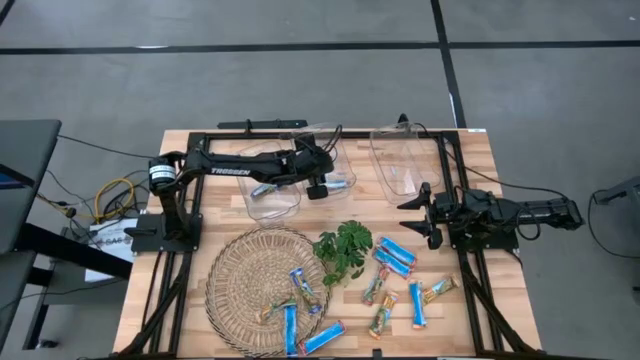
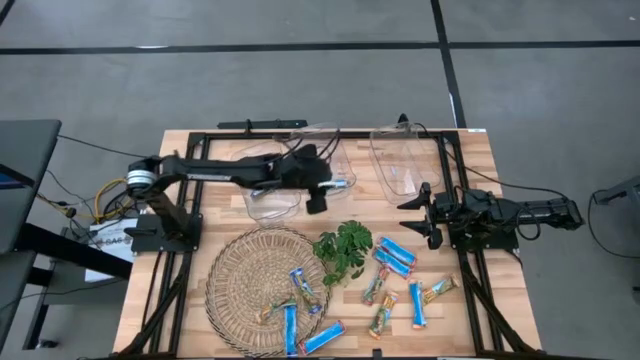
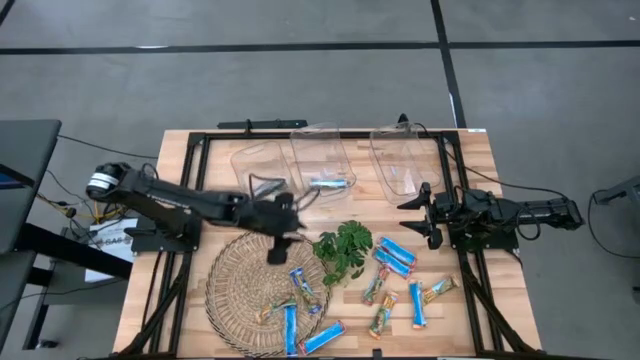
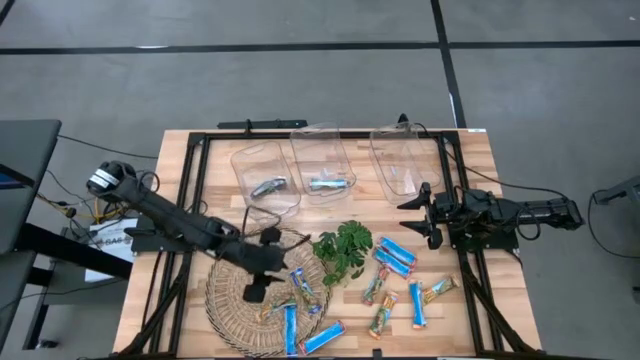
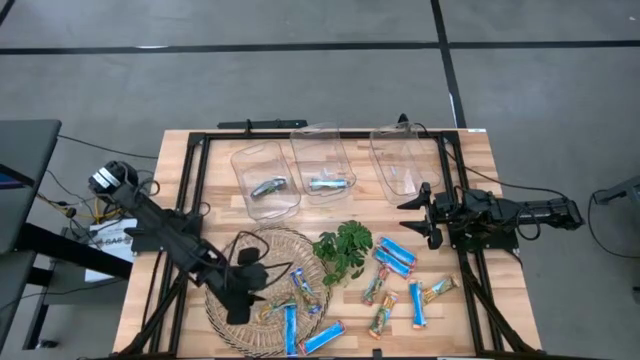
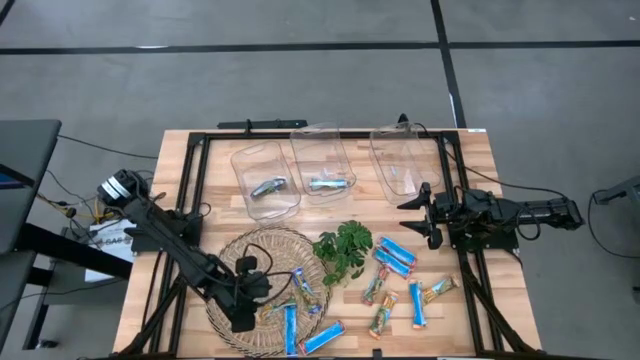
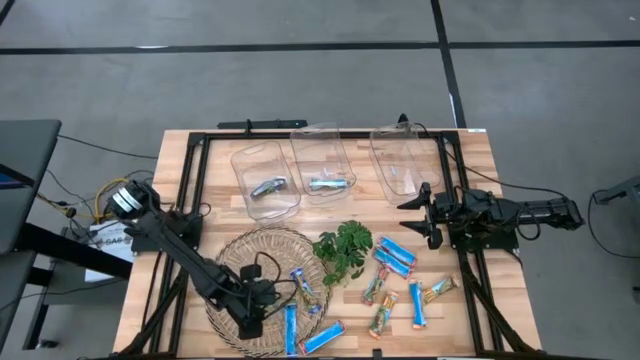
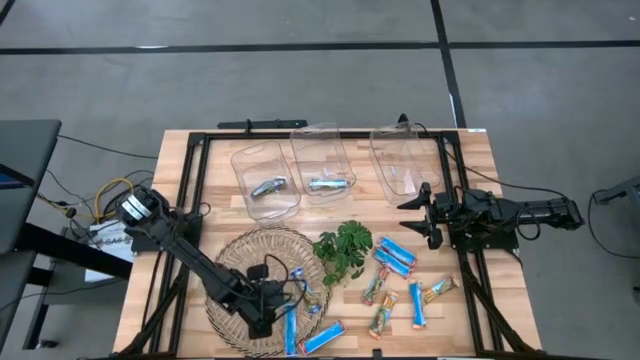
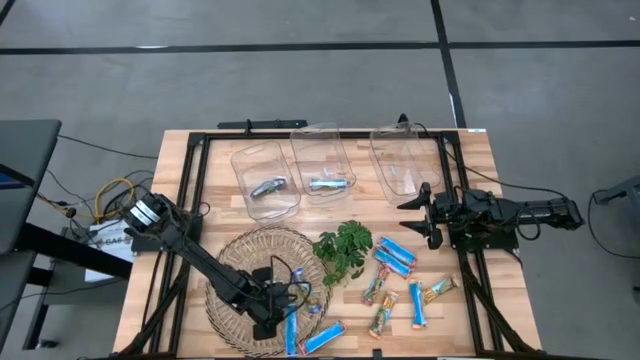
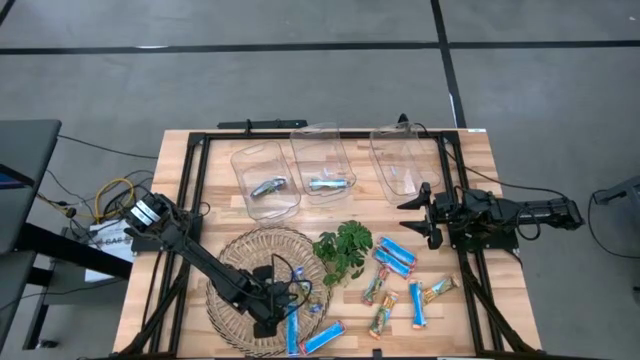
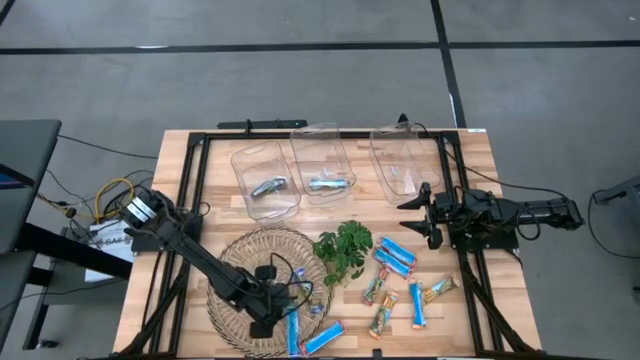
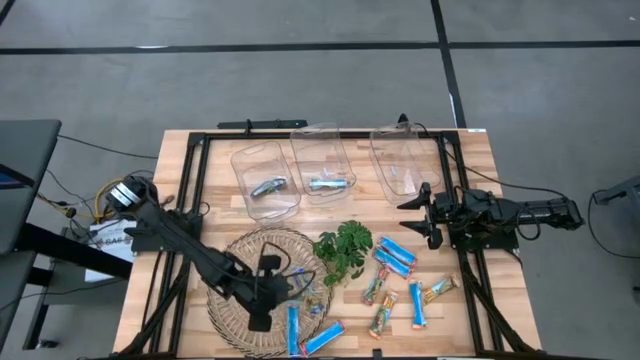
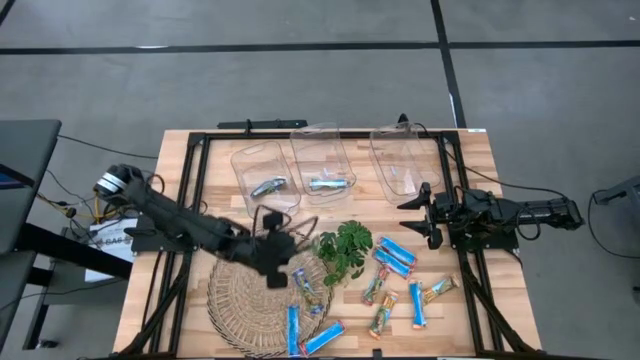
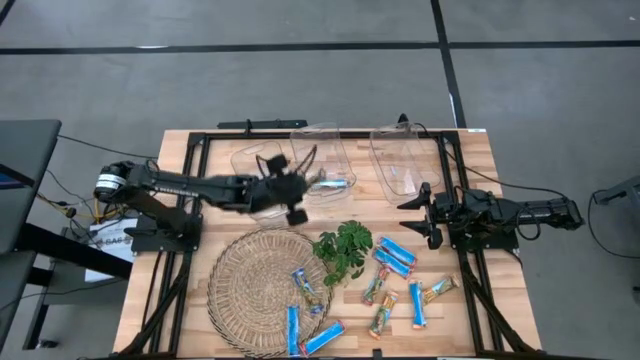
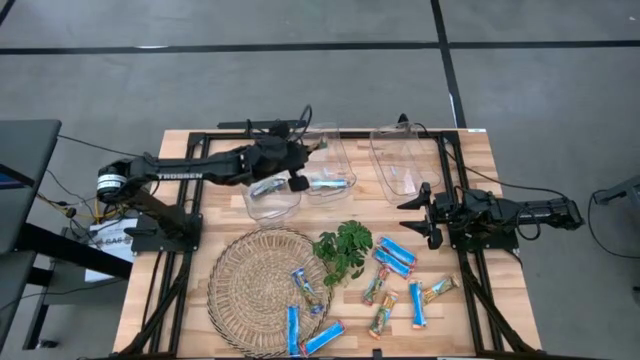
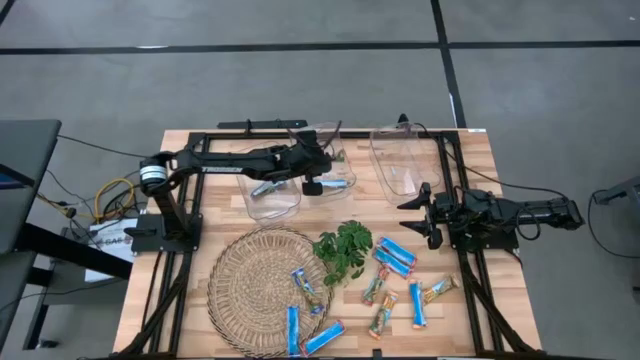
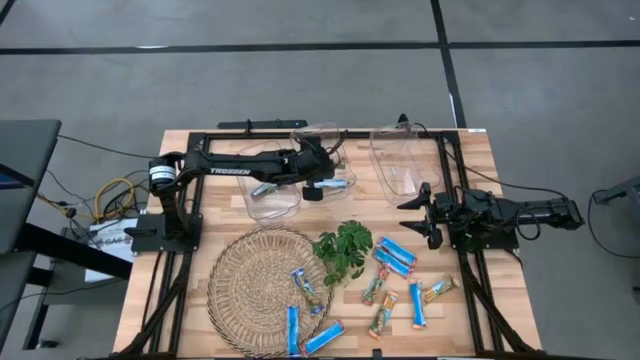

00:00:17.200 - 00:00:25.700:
Task: Pick and place Granola Bars by type
Put the yellow granola bar into the middle transparent bin

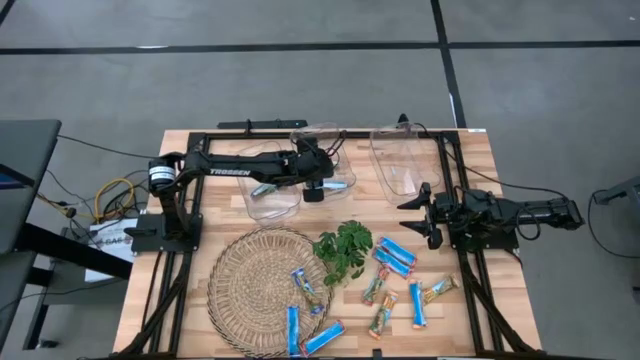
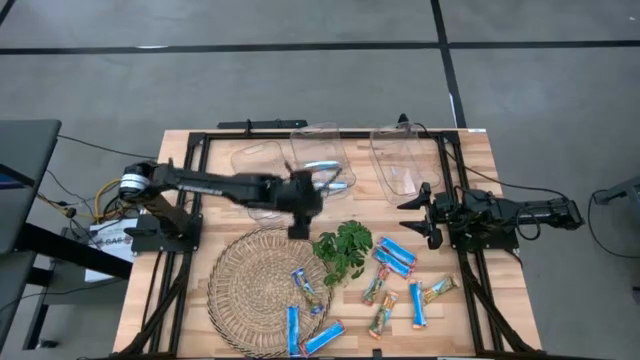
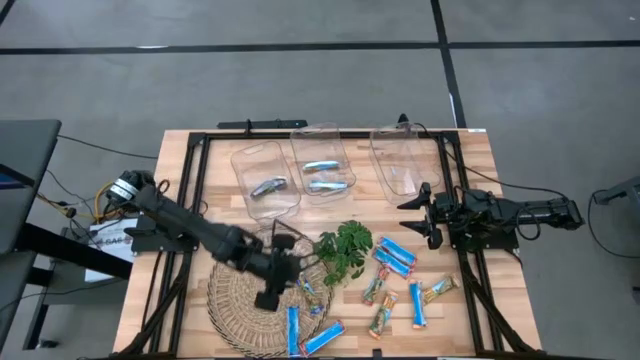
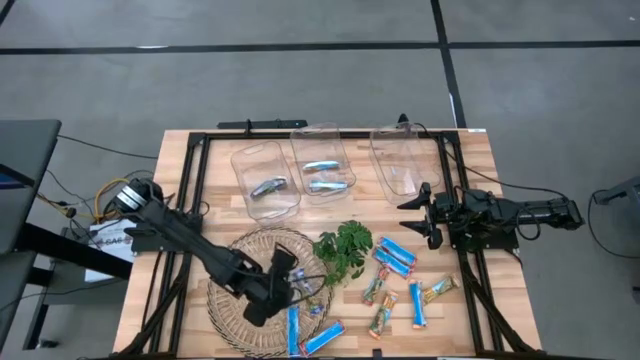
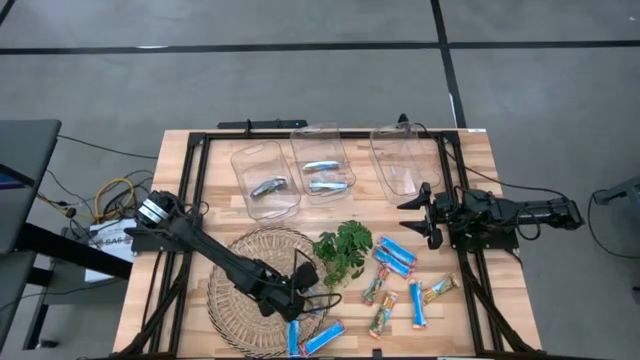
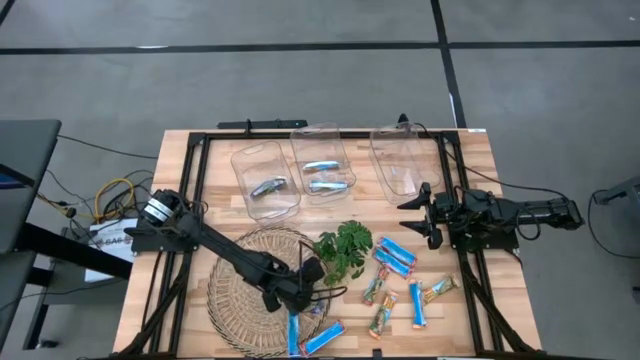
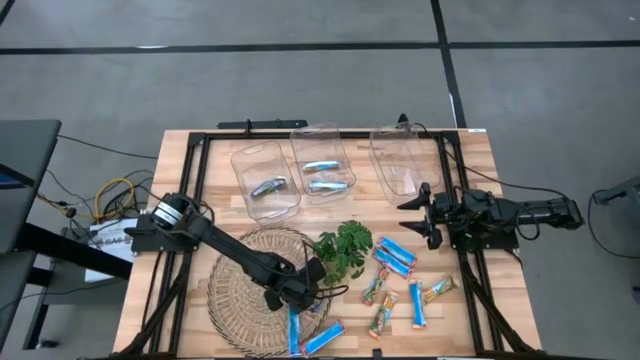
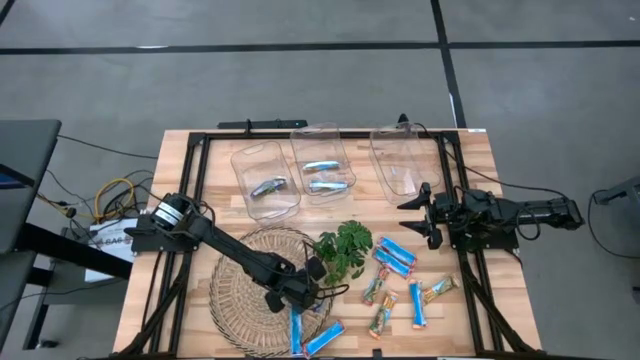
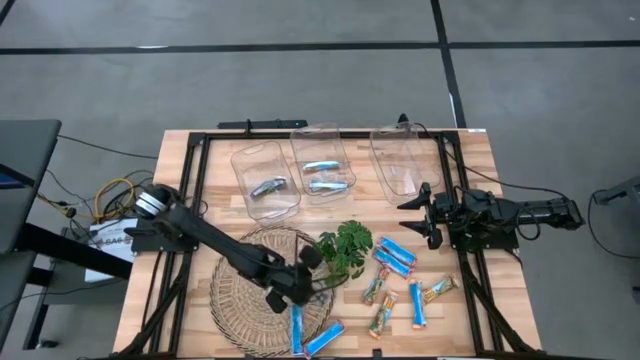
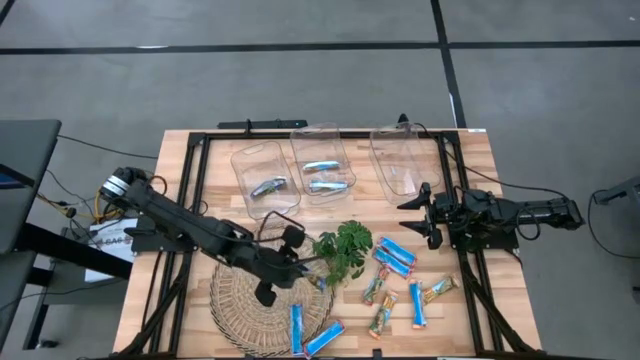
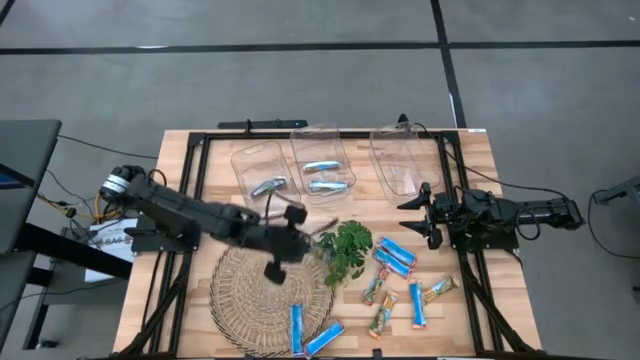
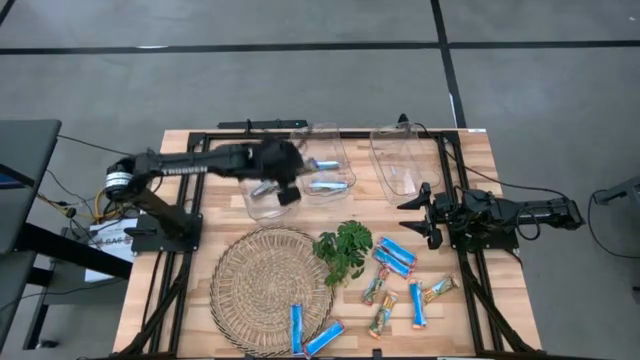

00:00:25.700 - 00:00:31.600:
Put the blue granola bar into the left transparent bin

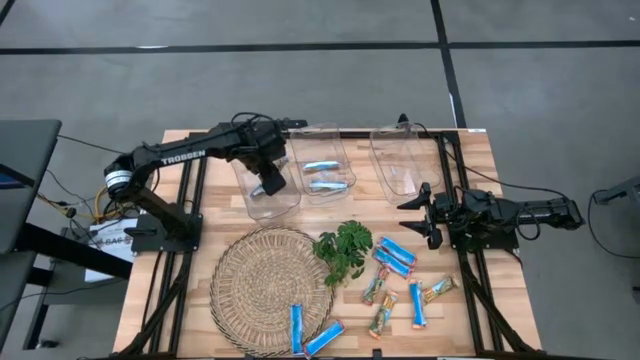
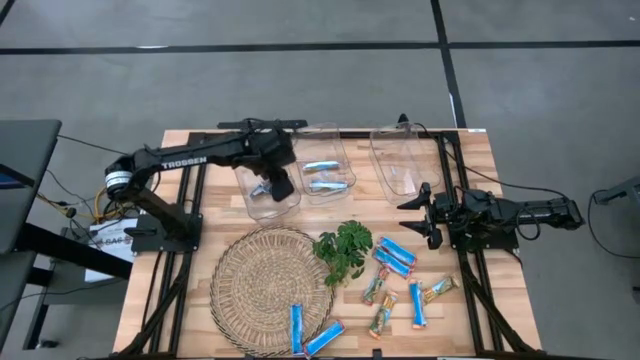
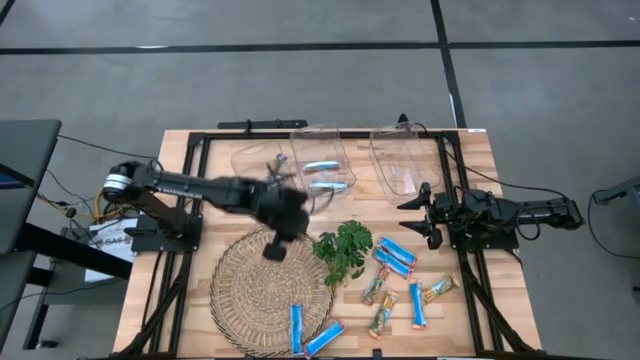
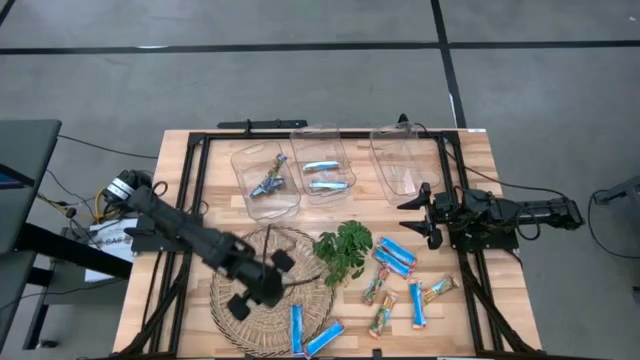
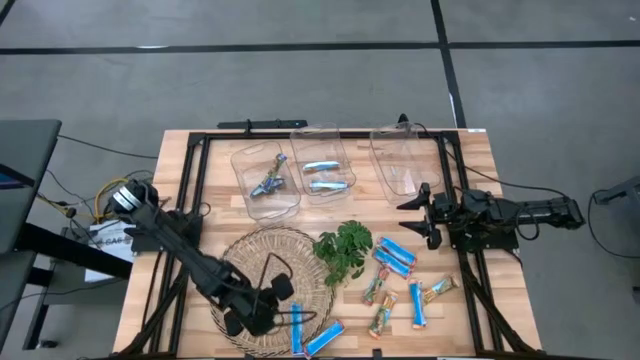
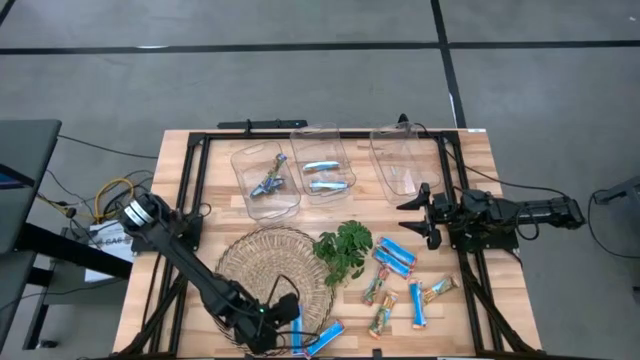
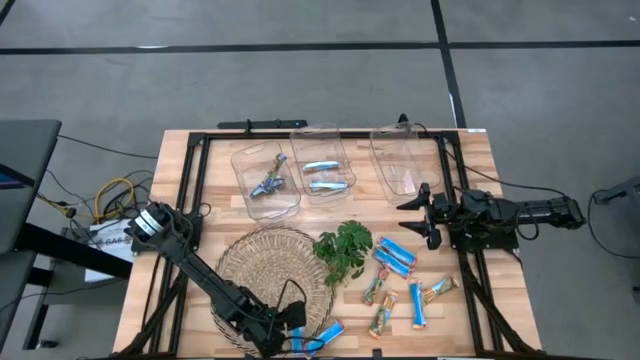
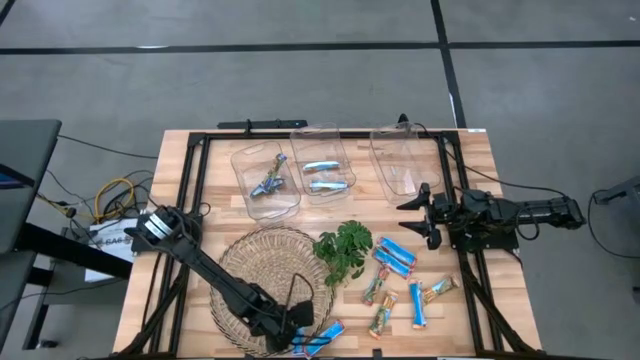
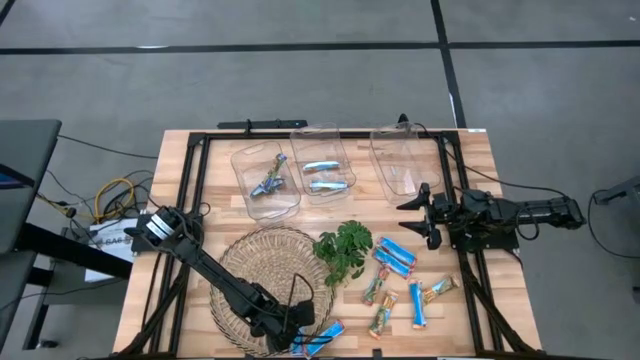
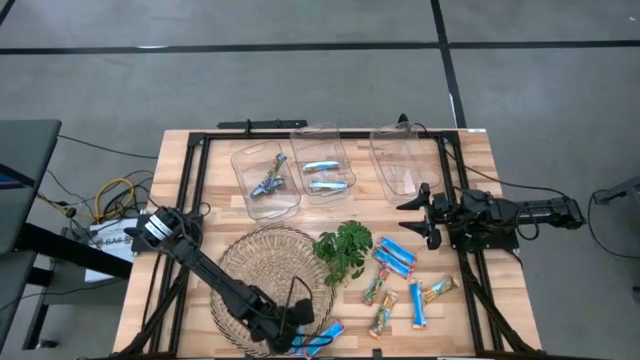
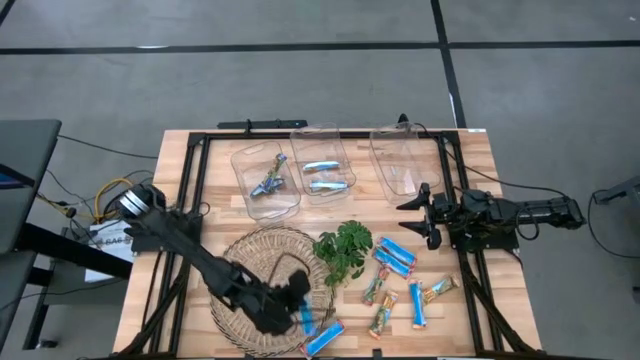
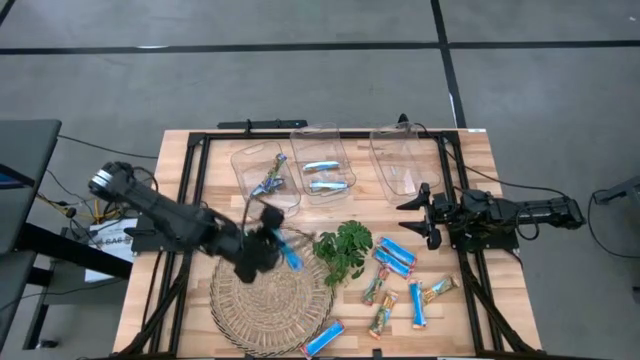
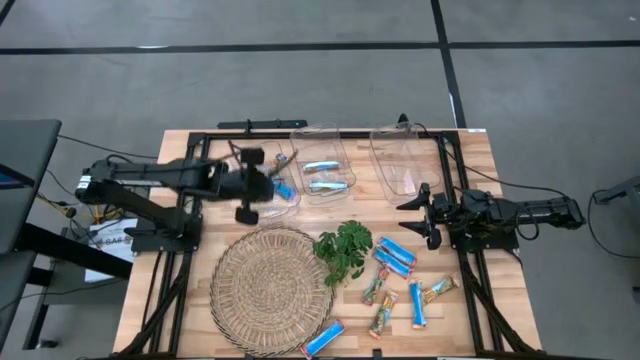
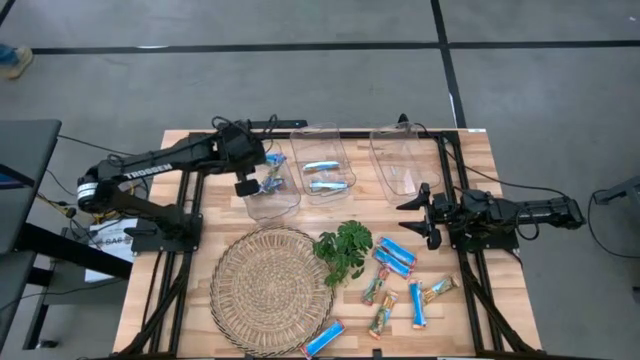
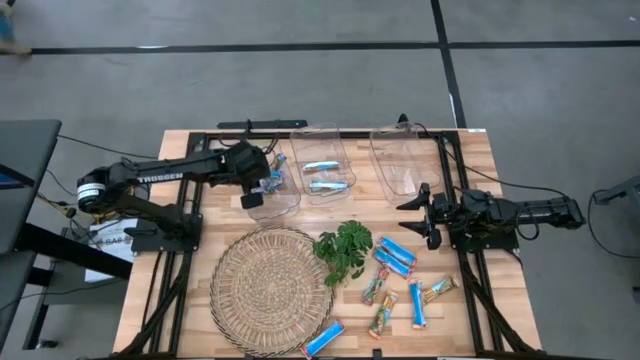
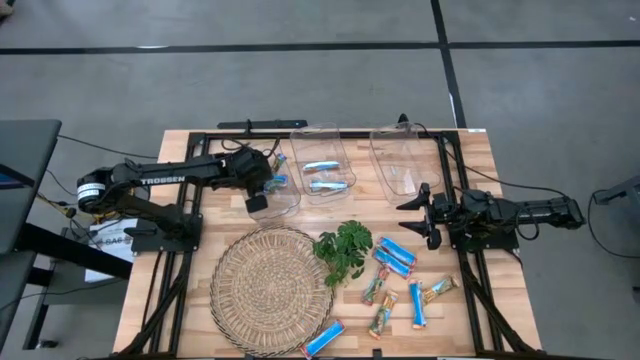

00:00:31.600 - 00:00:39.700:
Put the blue granola bar into the left transparent bin
